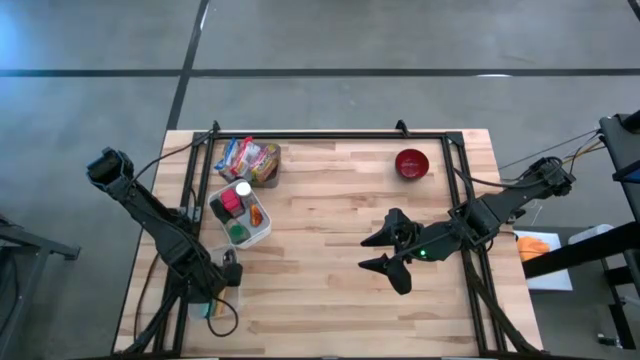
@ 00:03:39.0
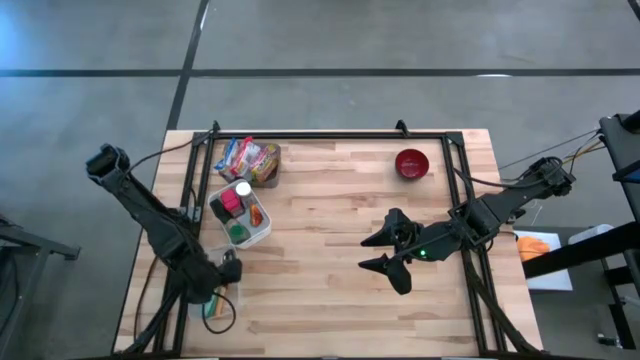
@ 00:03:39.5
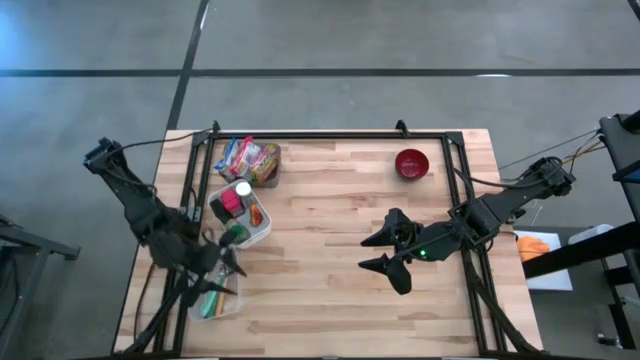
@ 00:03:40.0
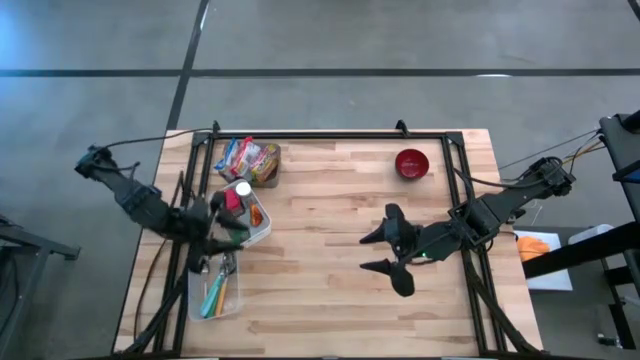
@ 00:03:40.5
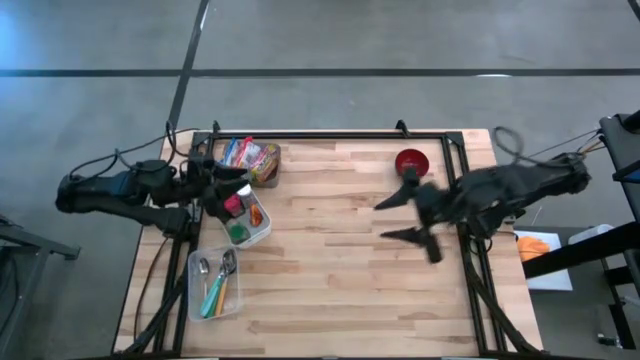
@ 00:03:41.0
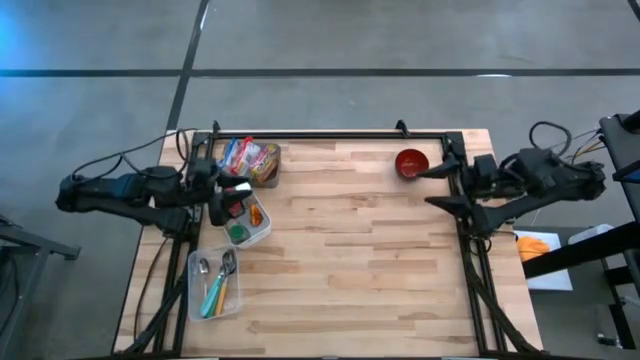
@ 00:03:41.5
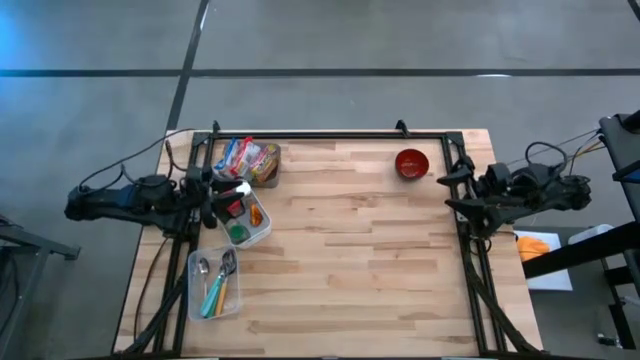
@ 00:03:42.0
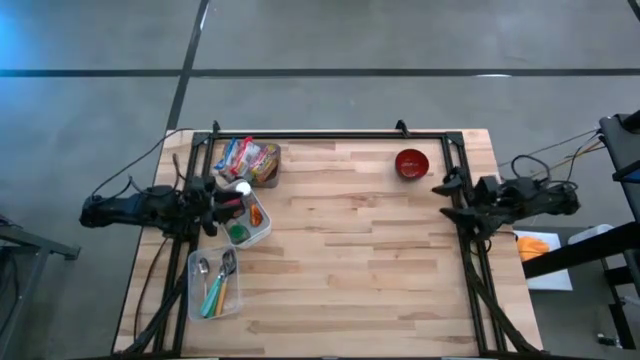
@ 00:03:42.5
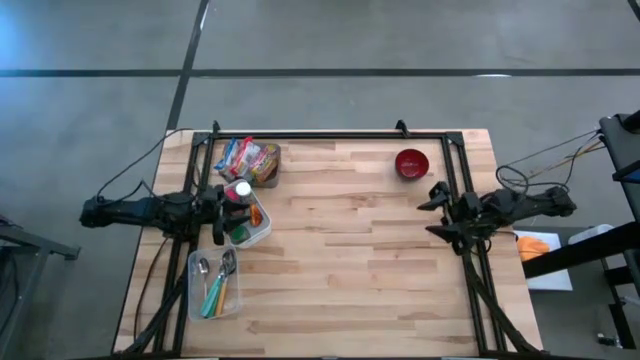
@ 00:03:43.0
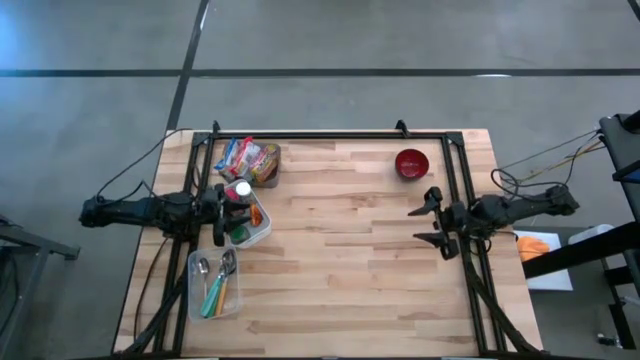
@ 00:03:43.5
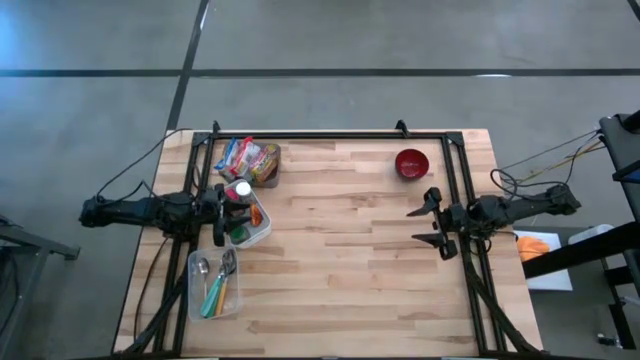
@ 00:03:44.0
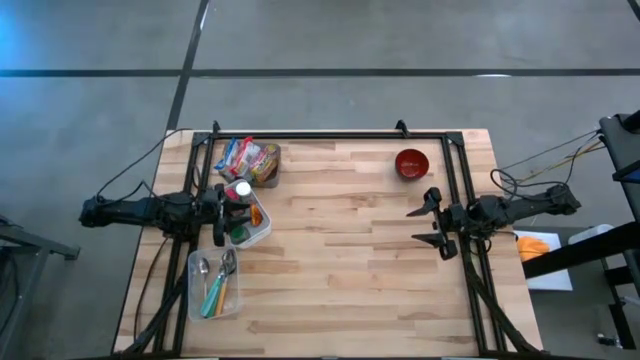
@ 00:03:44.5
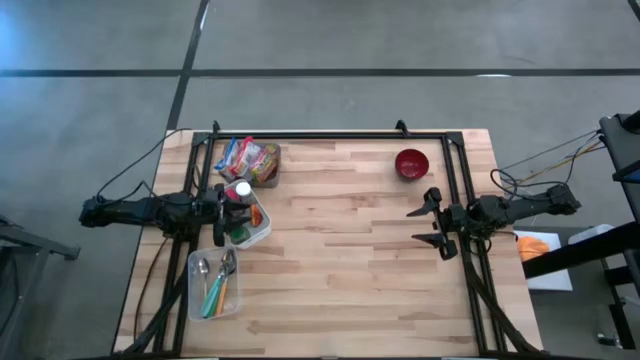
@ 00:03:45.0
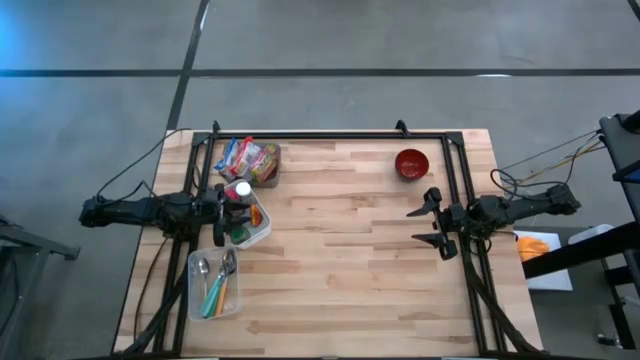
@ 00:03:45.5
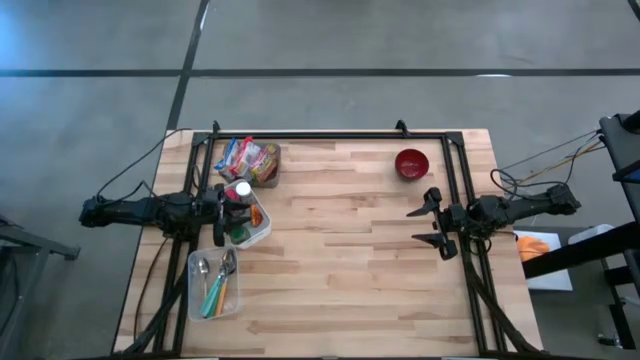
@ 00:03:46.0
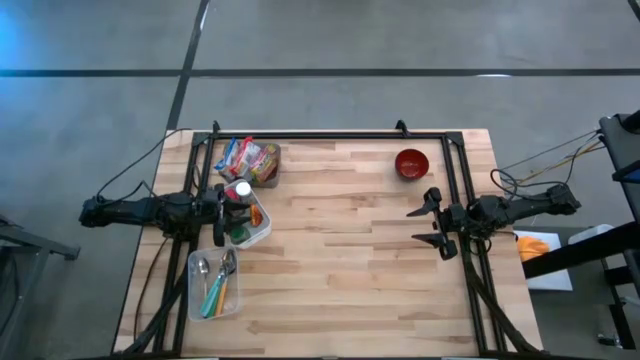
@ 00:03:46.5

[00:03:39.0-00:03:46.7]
Return to Home Position
